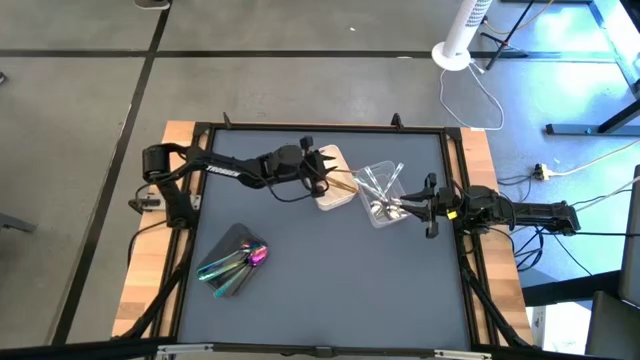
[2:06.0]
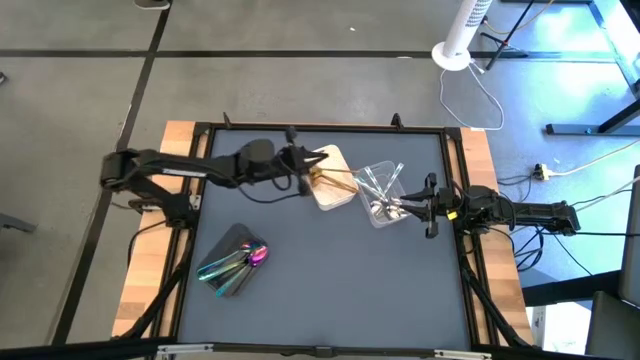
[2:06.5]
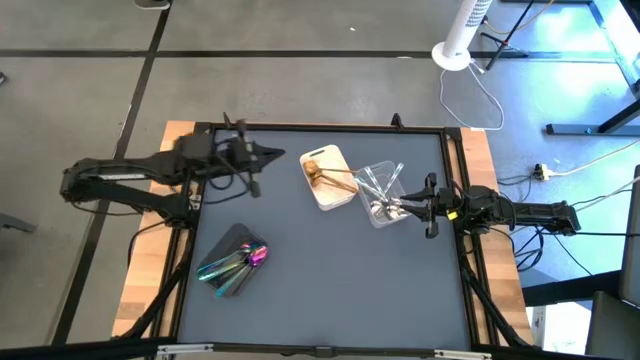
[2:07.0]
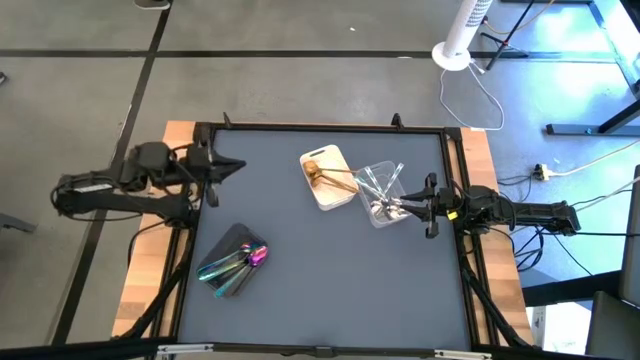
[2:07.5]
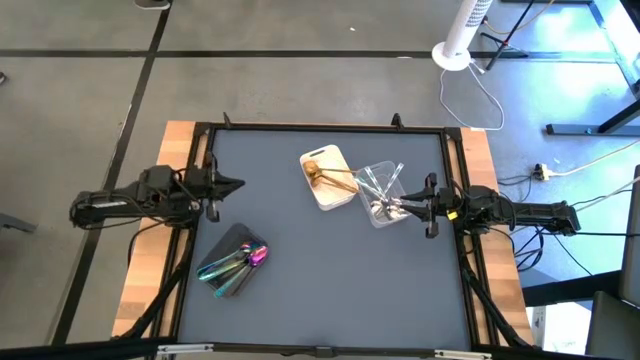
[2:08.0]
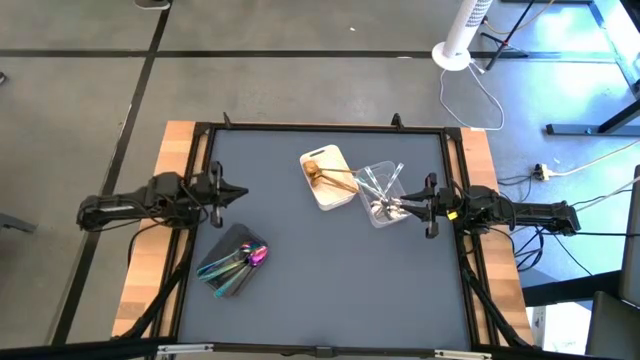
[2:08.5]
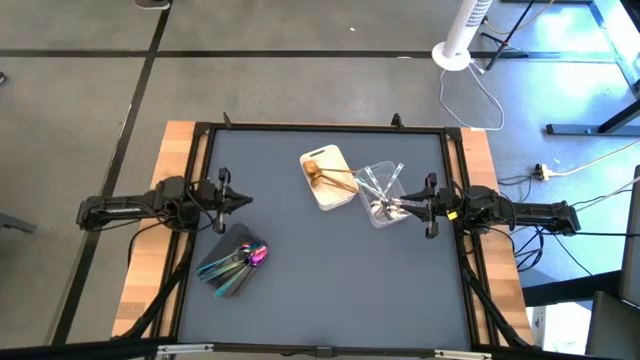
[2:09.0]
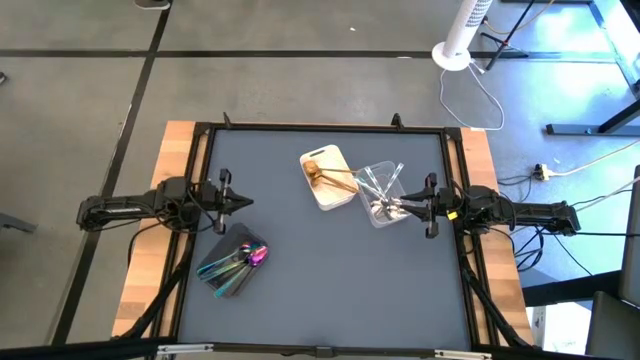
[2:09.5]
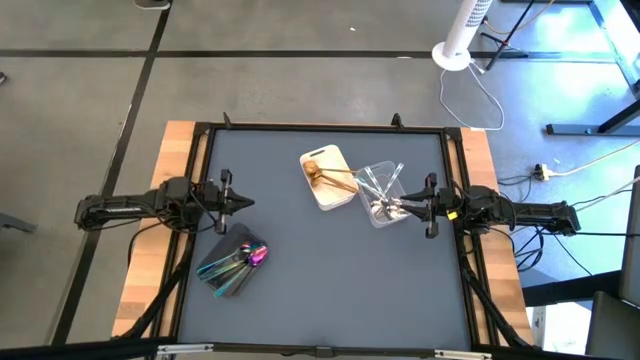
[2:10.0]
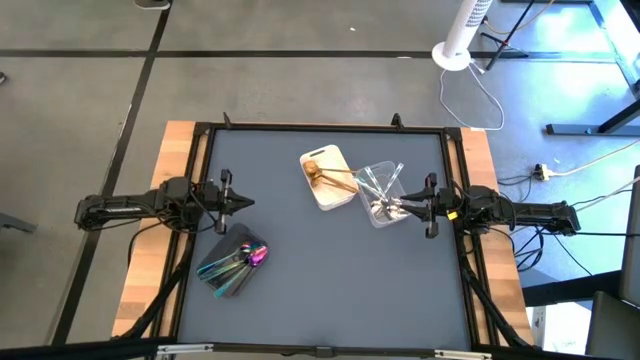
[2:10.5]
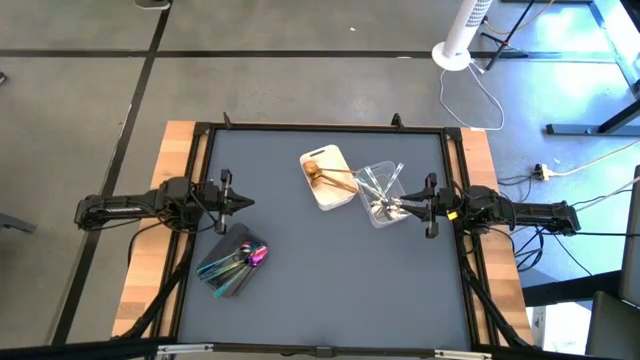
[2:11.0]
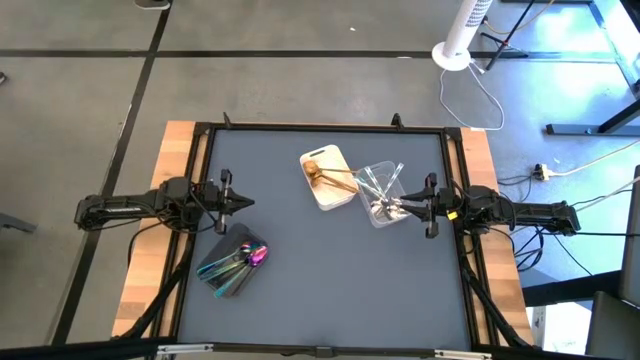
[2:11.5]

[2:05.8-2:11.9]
Task: Sort silverware by color (type)
Return to Home Position

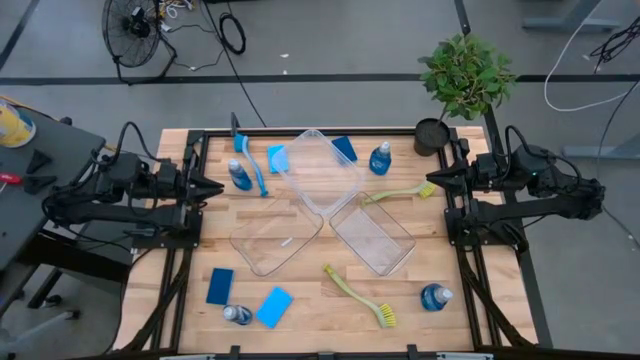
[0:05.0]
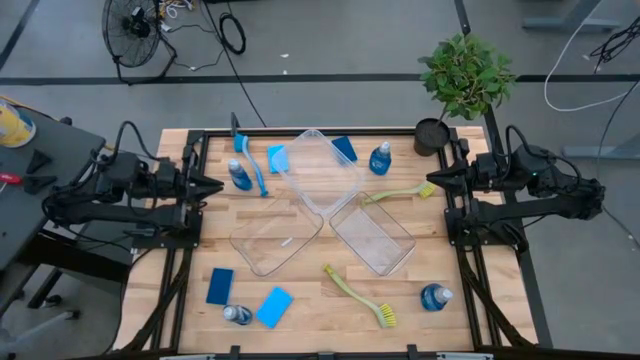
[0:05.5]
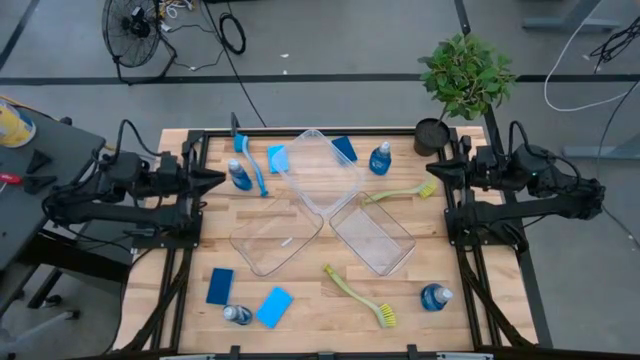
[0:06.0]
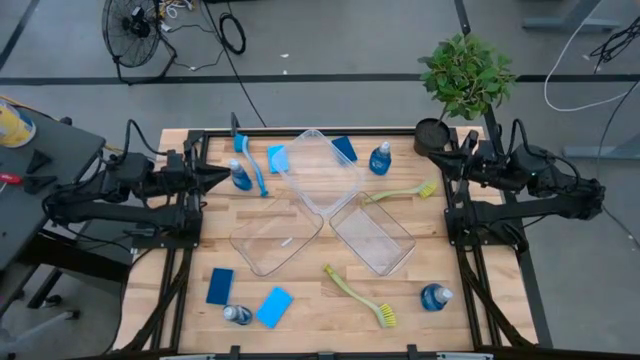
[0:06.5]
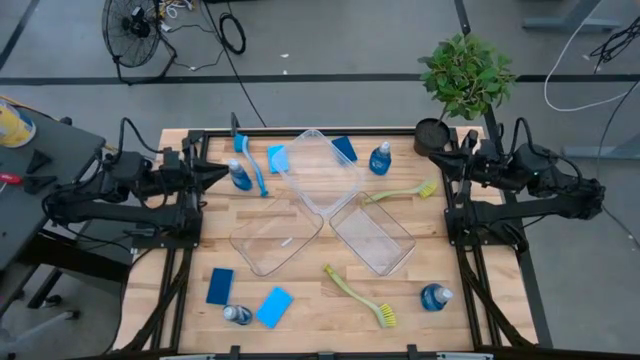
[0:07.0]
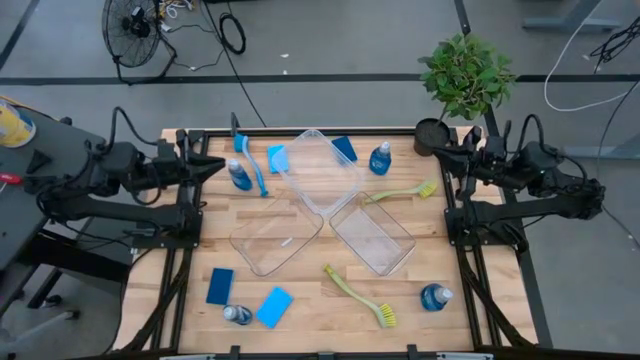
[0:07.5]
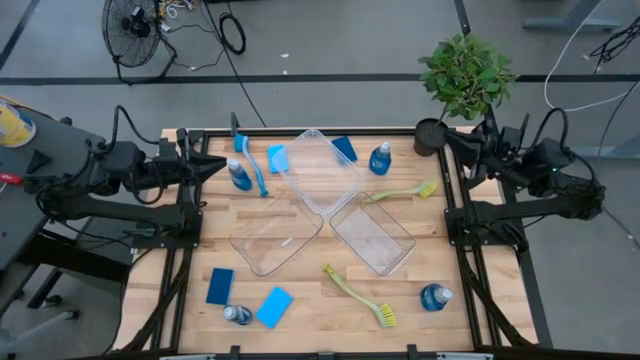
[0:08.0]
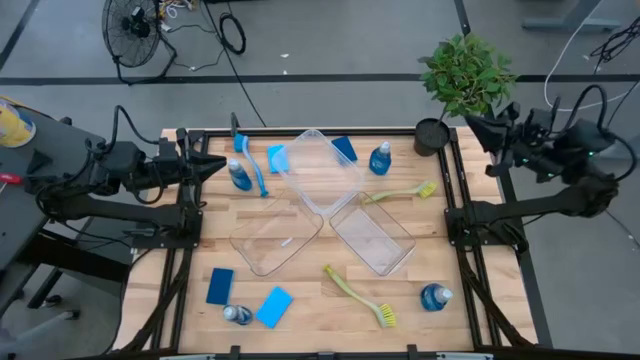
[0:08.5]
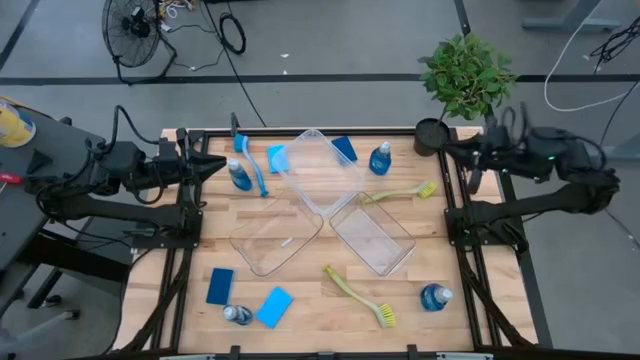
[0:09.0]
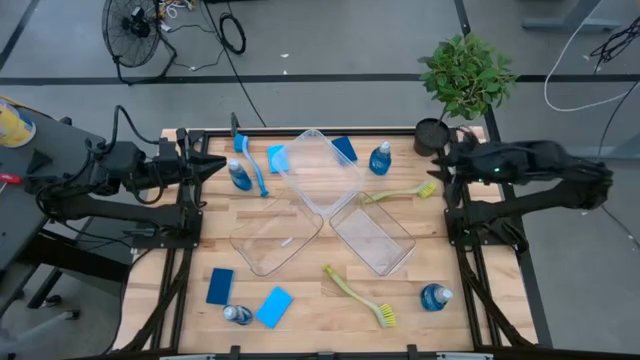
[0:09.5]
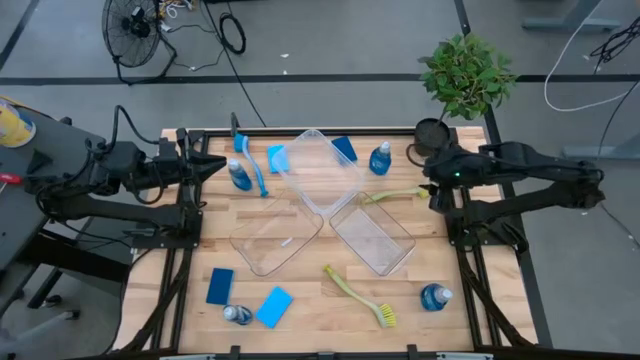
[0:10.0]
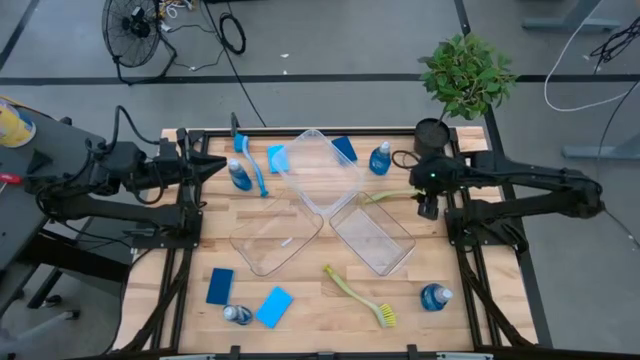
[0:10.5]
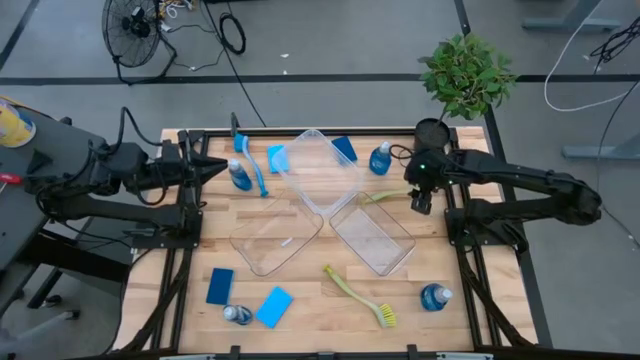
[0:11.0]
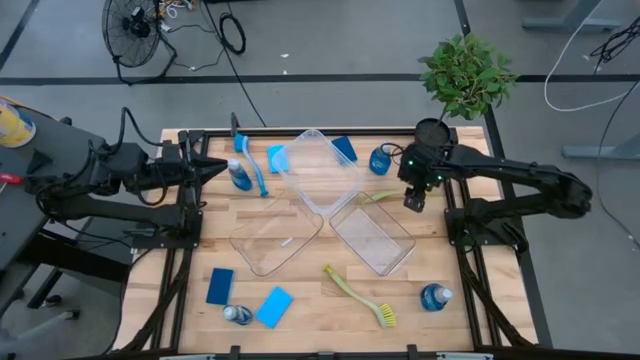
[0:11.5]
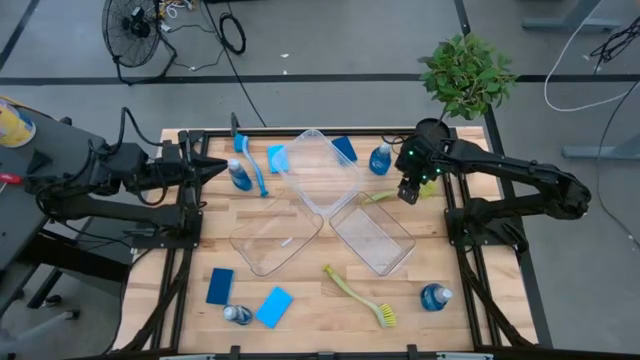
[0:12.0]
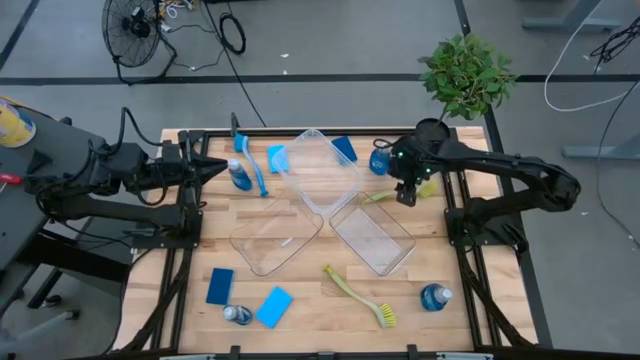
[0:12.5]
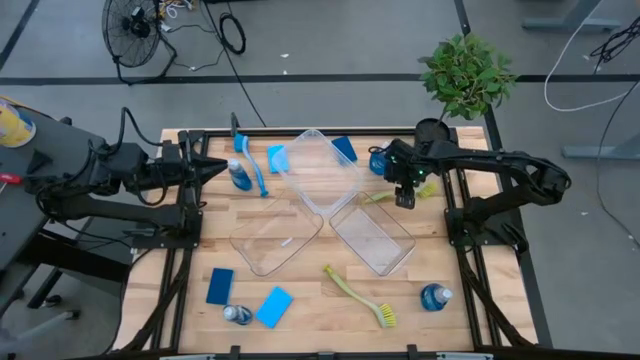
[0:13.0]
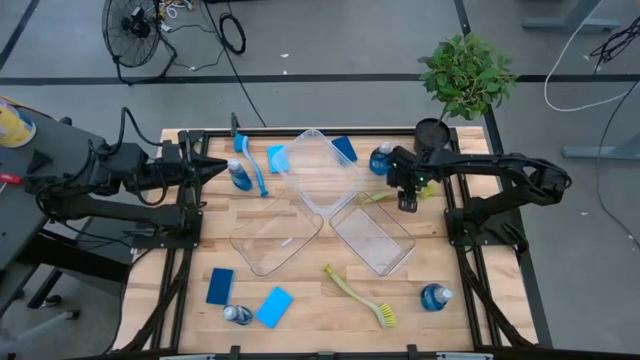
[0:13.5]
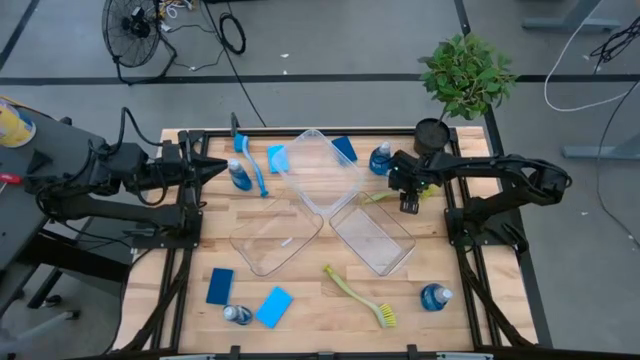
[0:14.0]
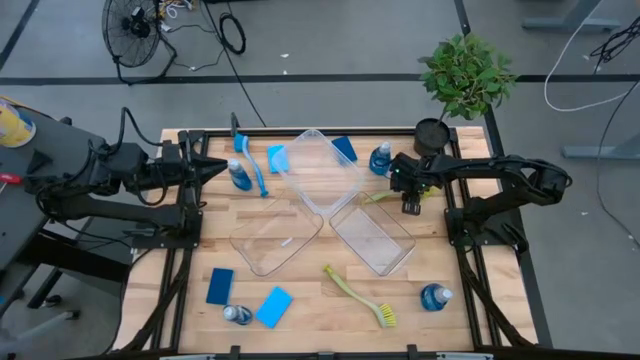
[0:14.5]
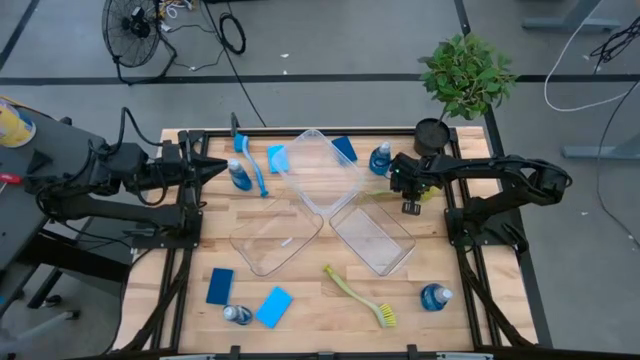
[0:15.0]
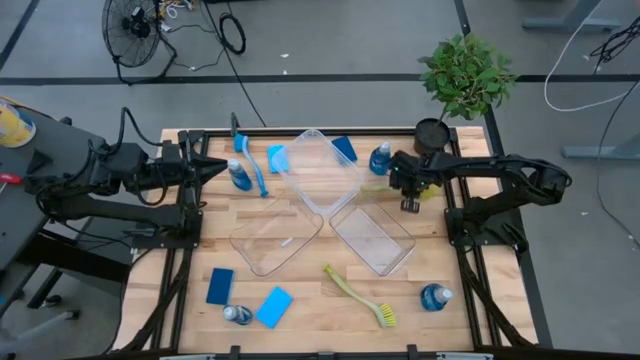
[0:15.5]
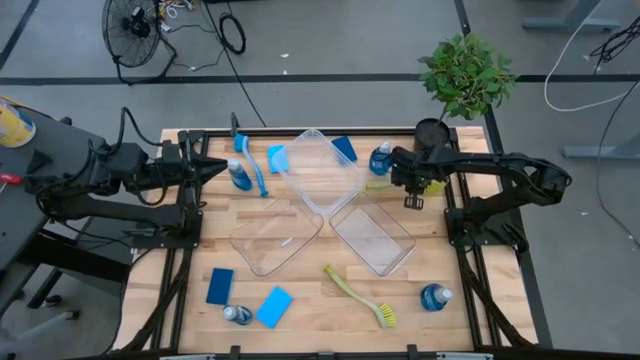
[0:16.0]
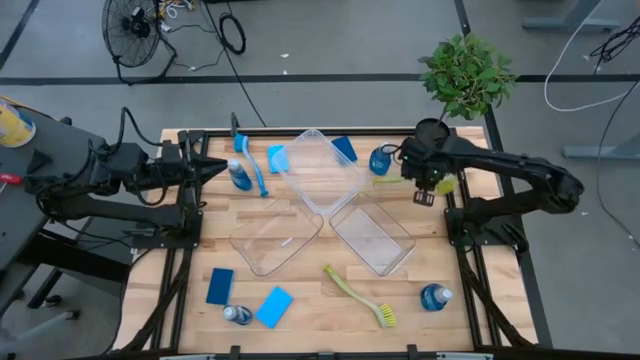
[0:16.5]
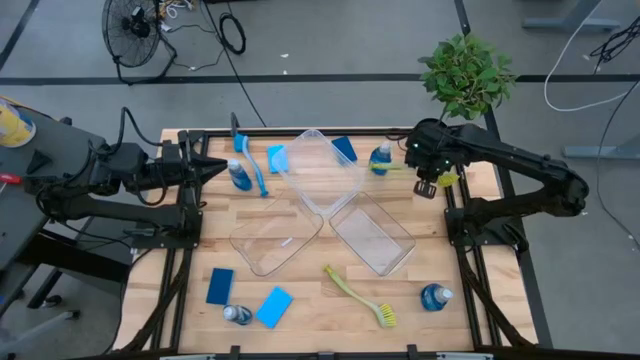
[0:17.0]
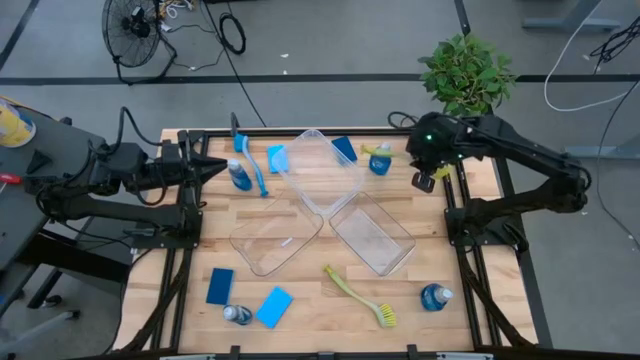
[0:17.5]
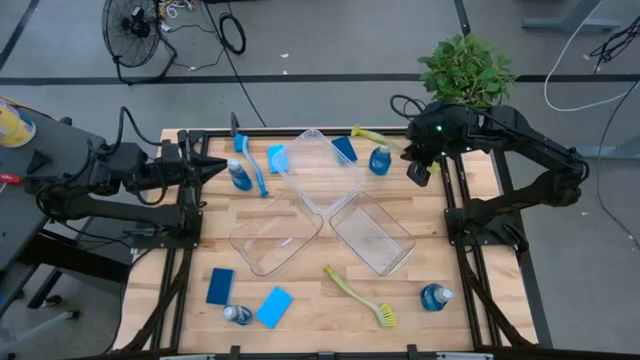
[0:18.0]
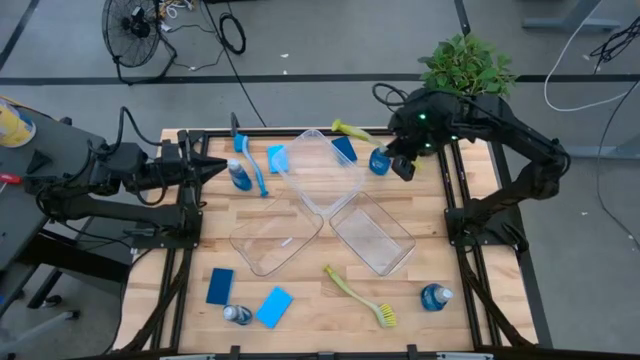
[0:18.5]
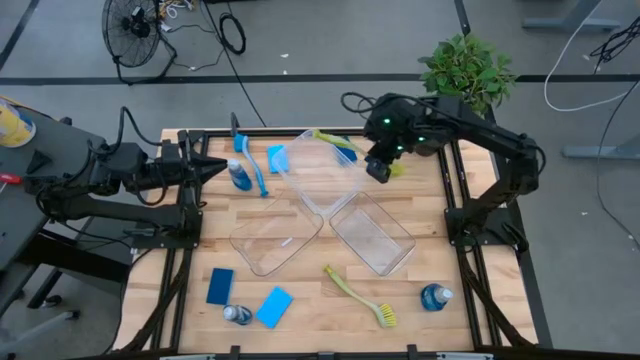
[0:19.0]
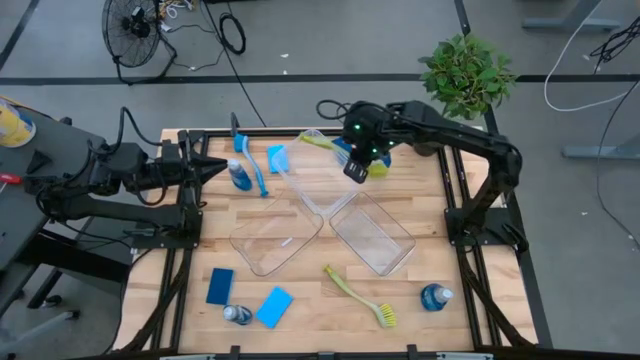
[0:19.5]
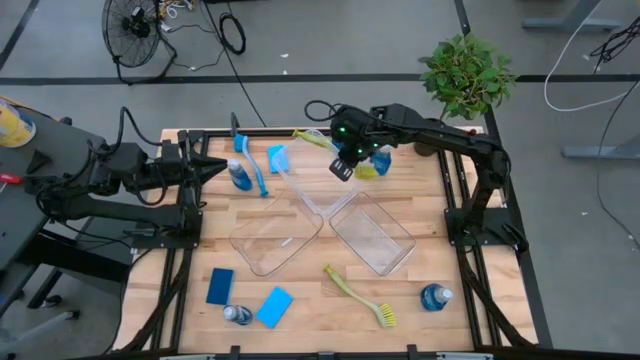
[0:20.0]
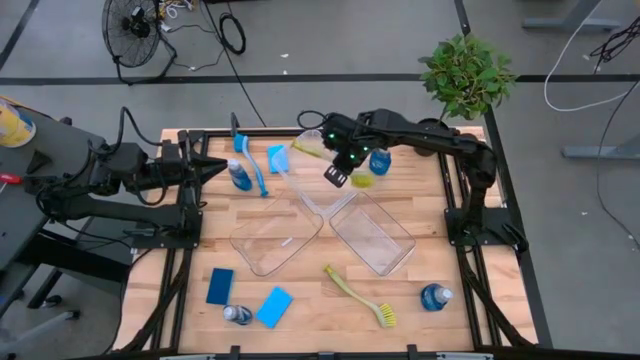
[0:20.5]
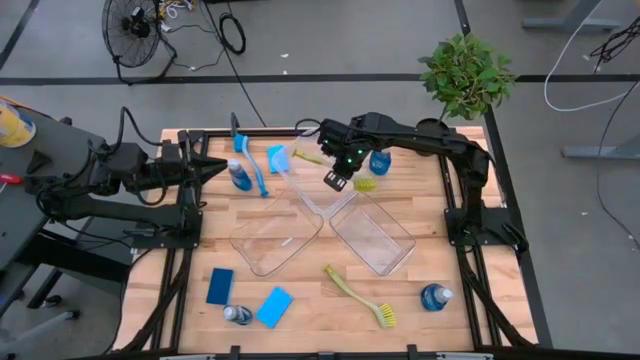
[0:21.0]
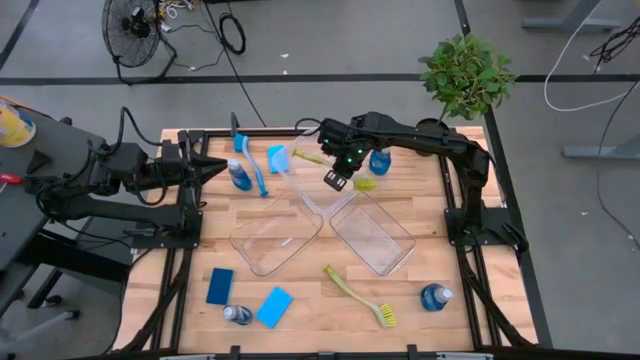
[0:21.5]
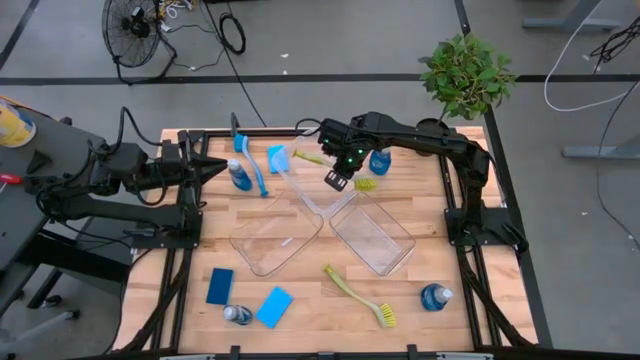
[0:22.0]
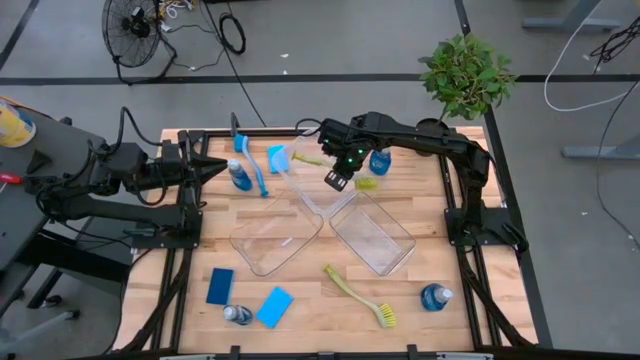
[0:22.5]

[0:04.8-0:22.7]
Task: Pick & Place Kitchen Sink Supplies
Put the yellow toilet brush into the transparent container
